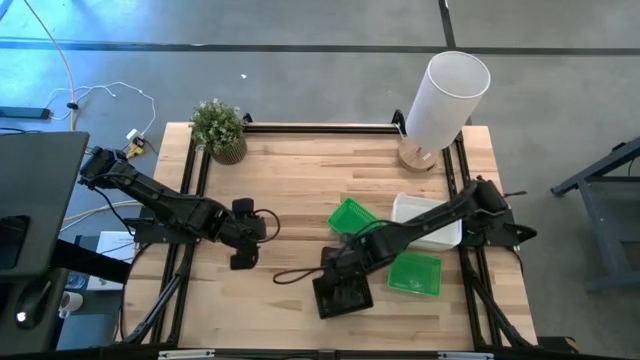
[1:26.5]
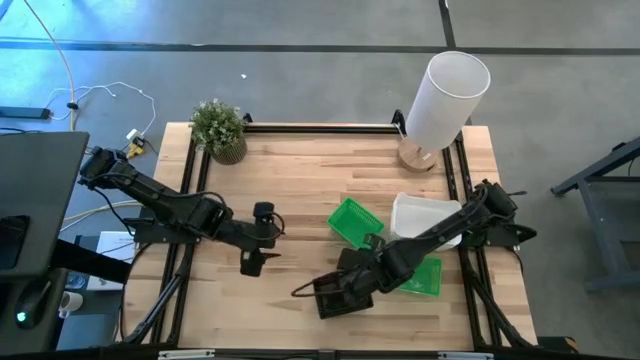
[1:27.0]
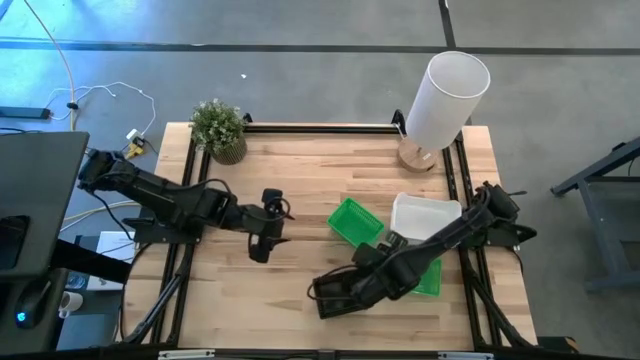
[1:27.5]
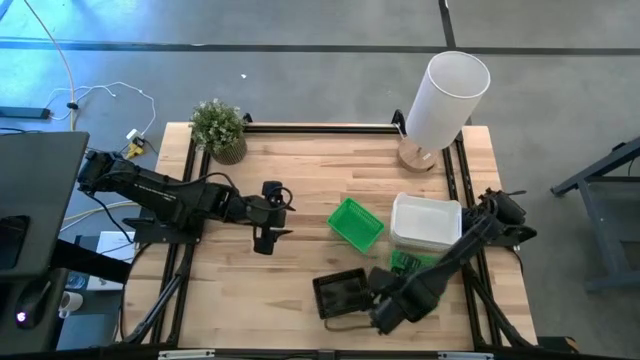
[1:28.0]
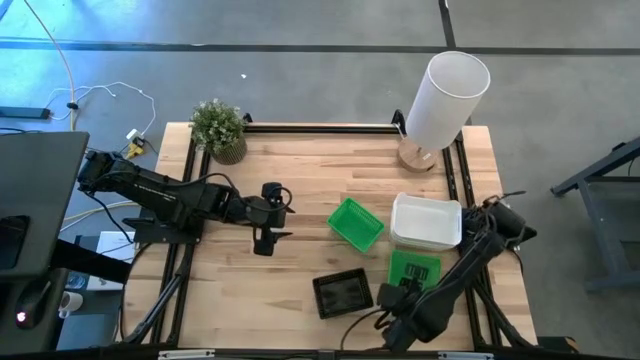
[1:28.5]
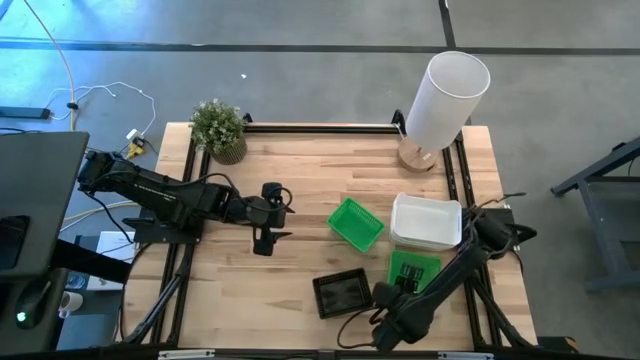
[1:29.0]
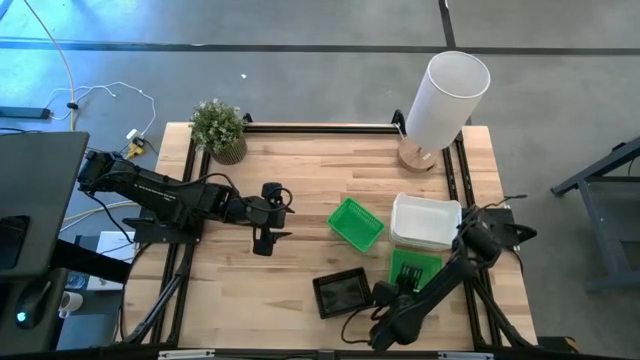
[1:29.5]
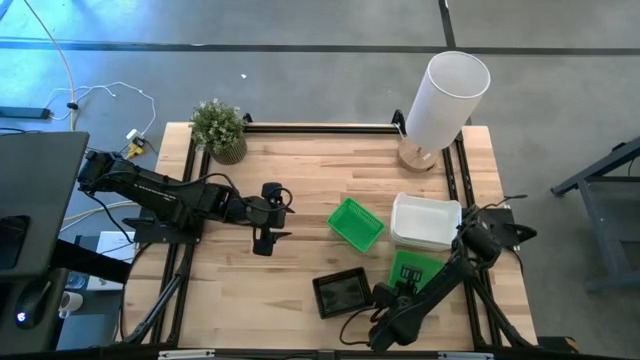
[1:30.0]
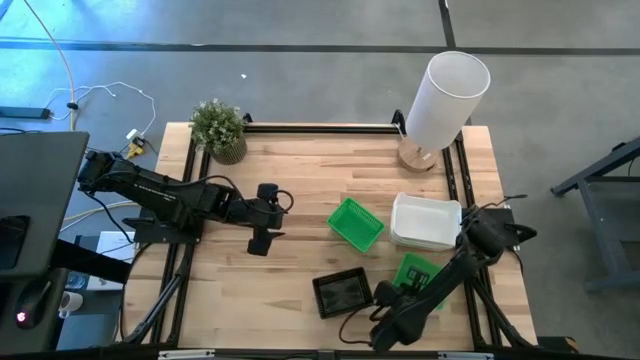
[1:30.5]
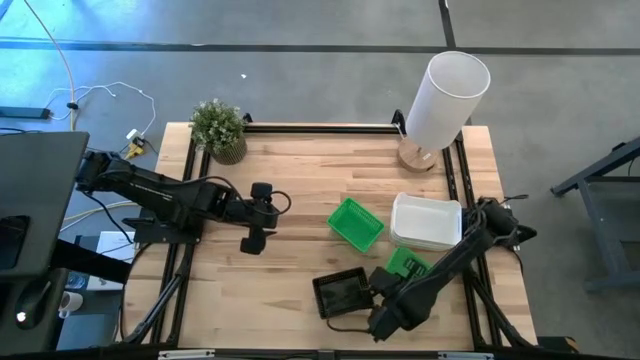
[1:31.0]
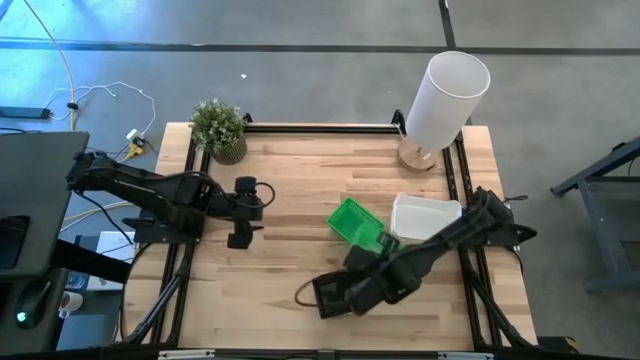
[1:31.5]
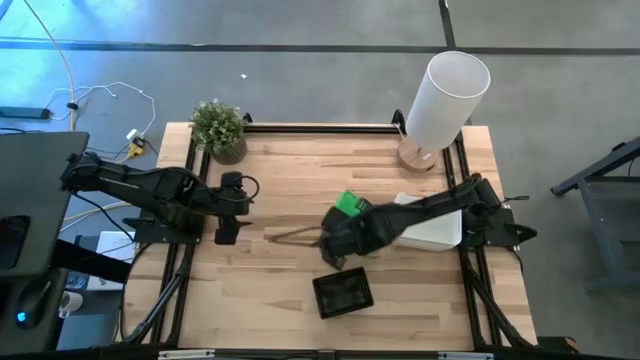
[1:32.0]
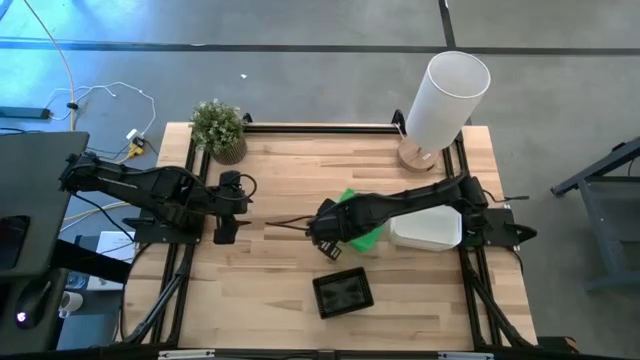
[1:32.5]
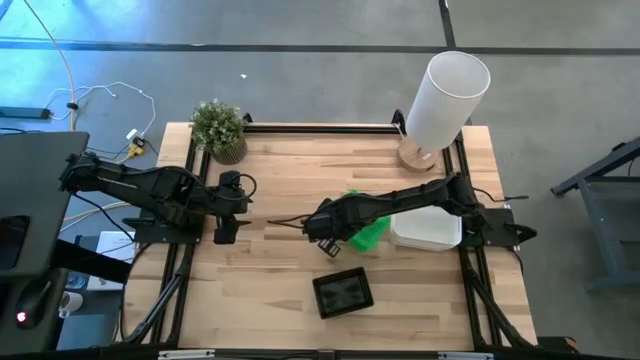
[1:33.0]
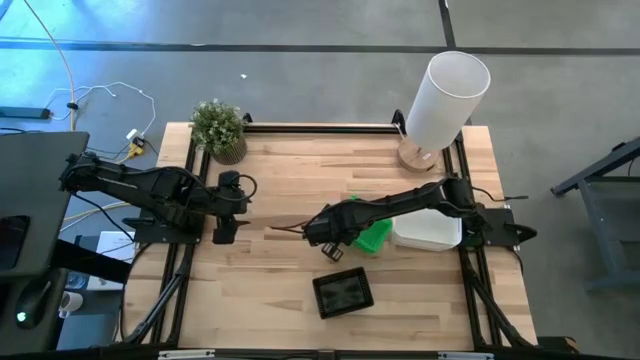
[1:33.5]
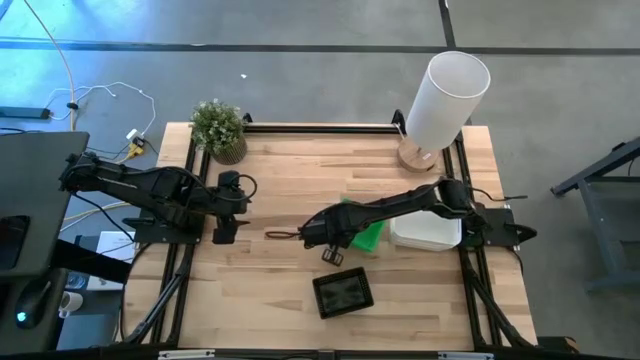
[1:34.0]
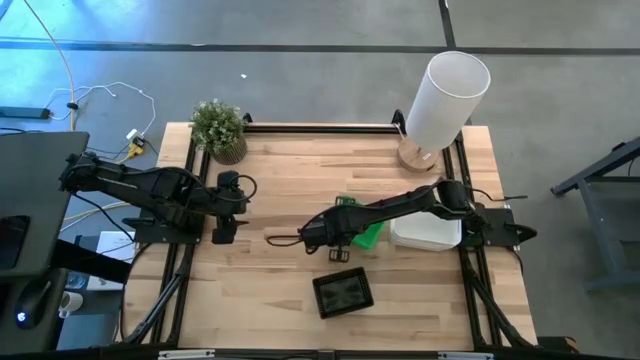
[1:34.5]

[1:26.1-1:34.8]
Stack the bottom green bin on the green bins

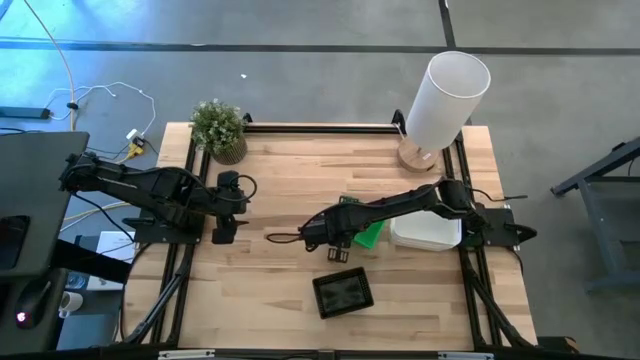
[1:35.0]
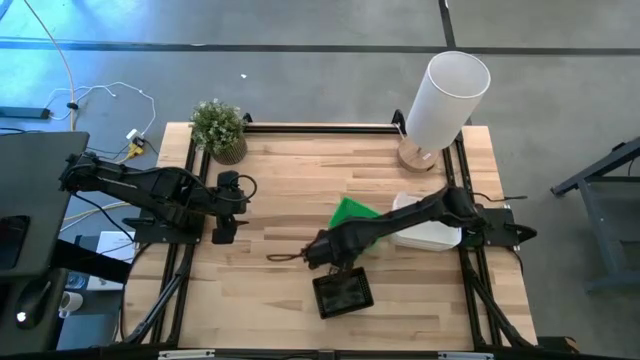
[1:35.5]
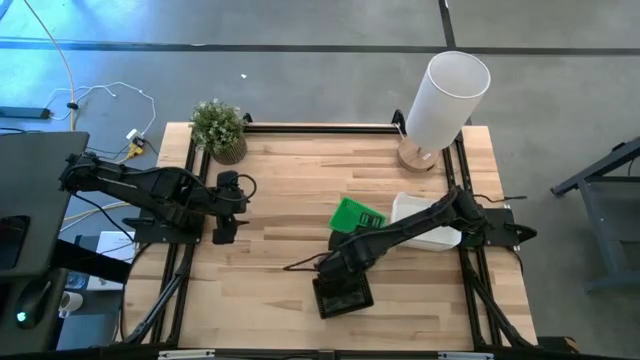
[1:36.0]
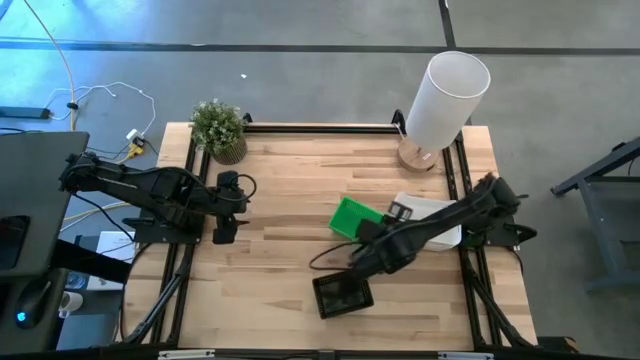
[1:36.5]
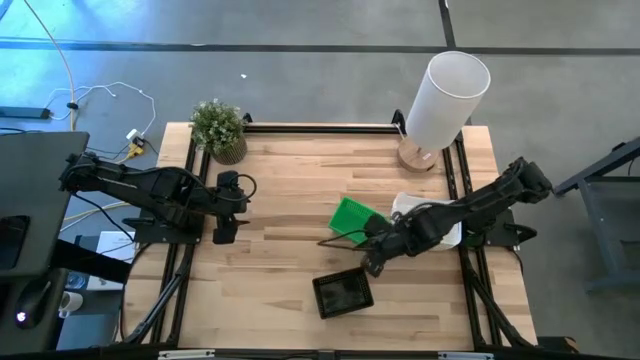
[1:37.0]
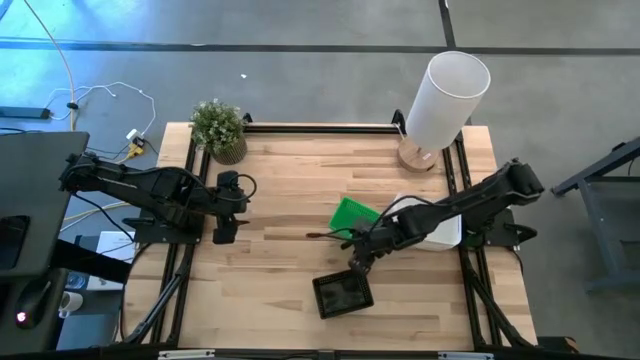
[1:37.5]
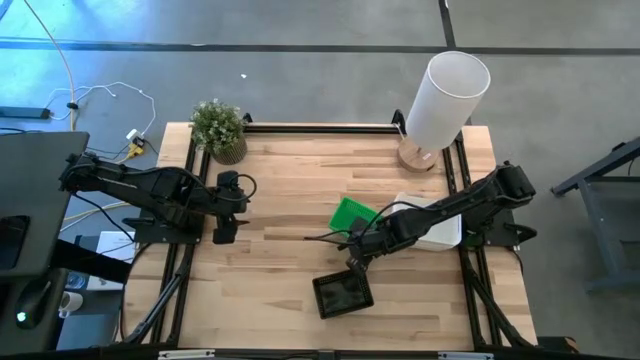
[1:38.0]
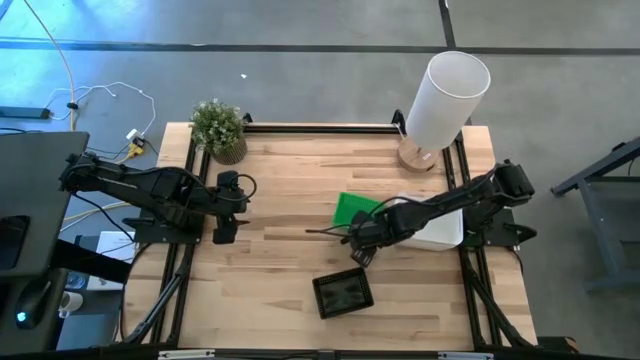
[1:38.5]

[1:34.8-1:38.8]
Adjust the stack of the green bins

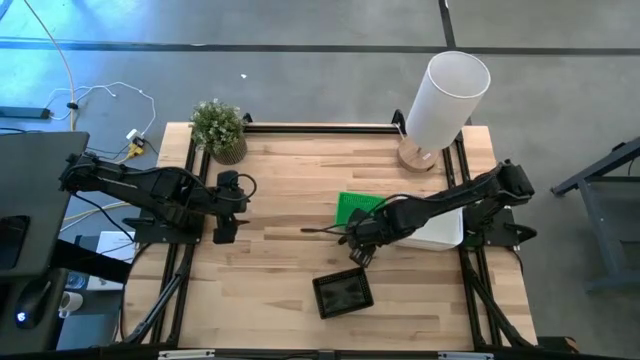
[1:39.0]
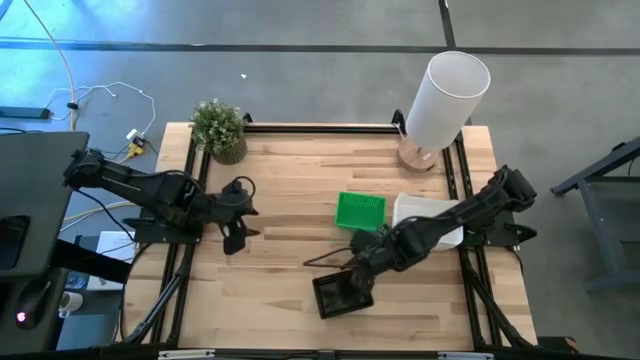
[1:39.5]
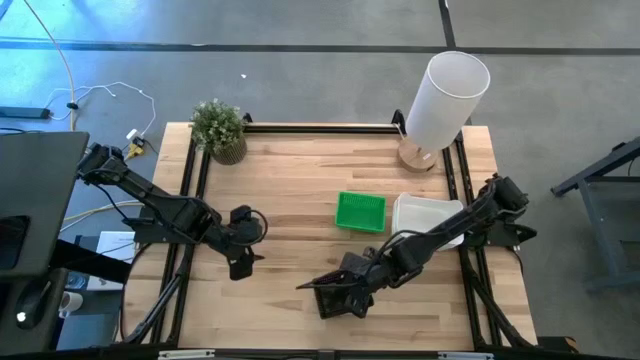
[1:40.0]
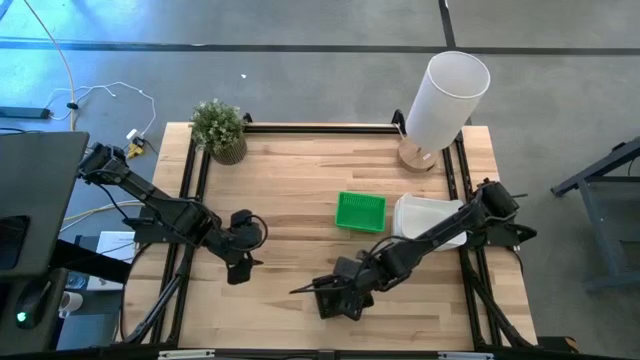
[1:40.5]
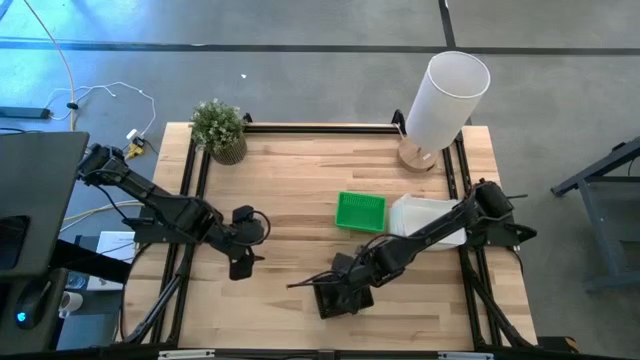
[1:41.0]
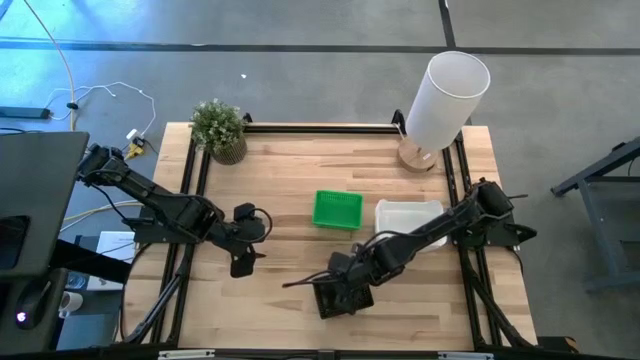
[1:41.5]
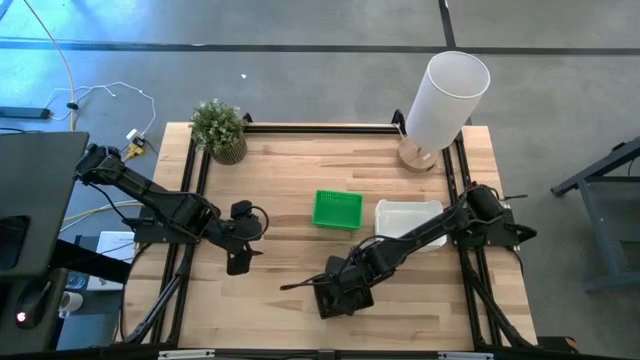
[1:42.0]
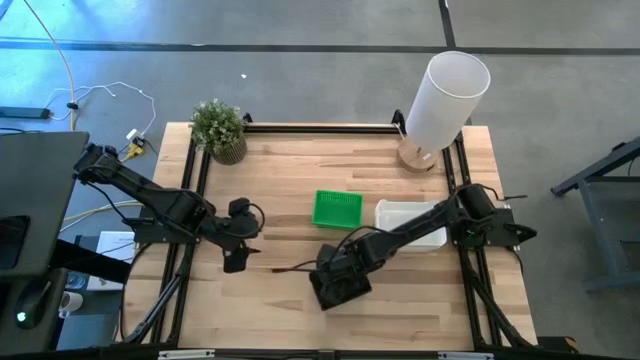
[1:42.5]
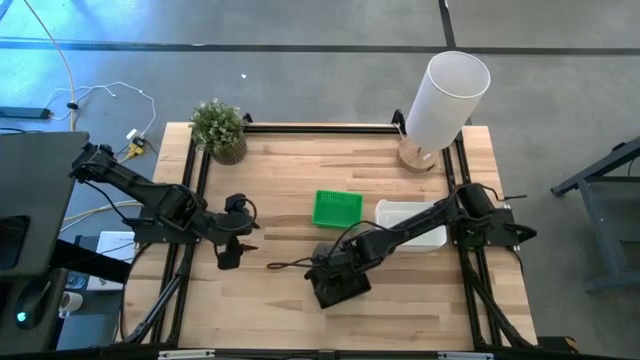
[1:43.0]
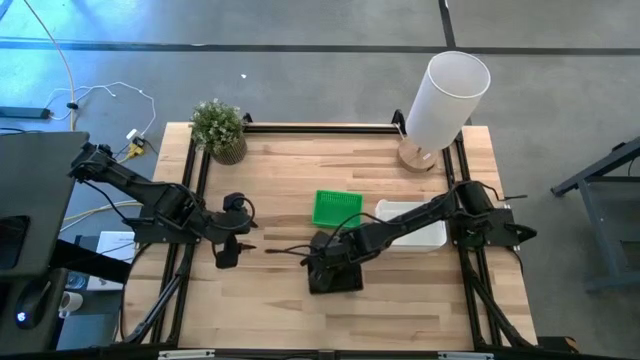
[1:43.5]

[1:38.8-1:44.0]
Adjust the stack of the black bins
